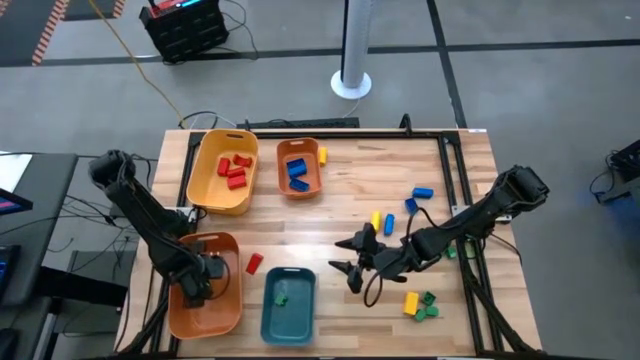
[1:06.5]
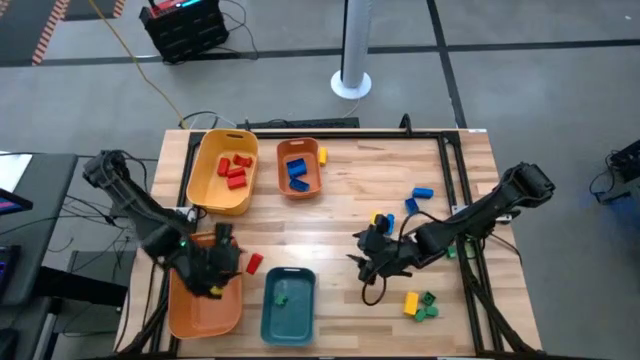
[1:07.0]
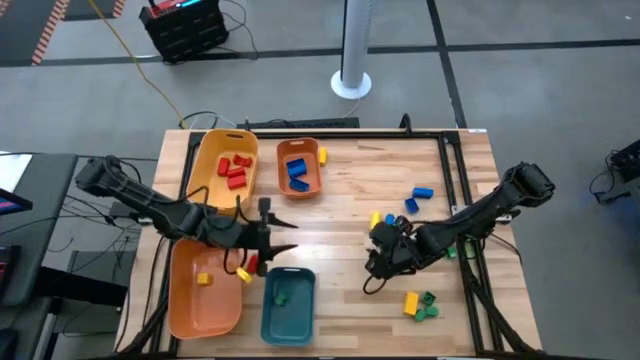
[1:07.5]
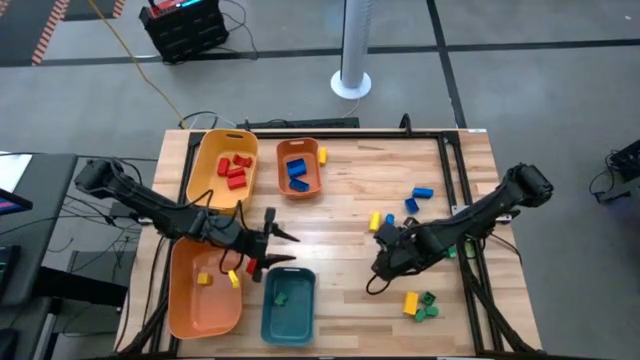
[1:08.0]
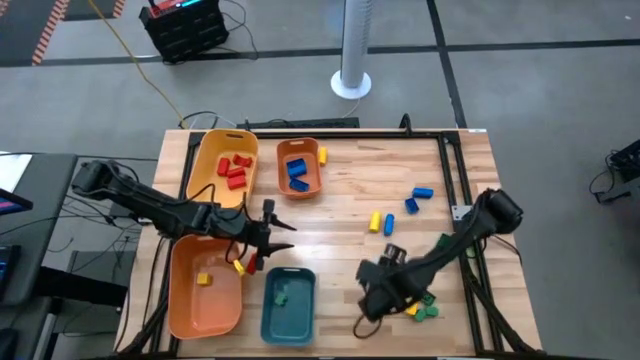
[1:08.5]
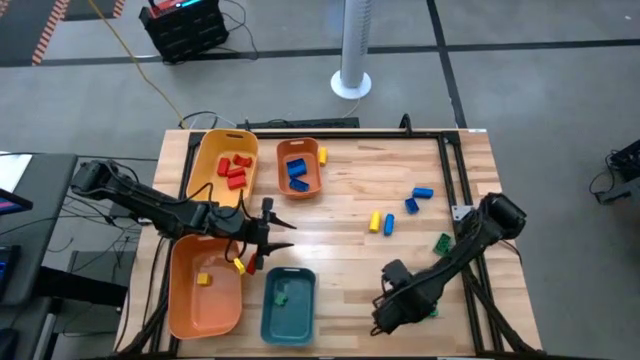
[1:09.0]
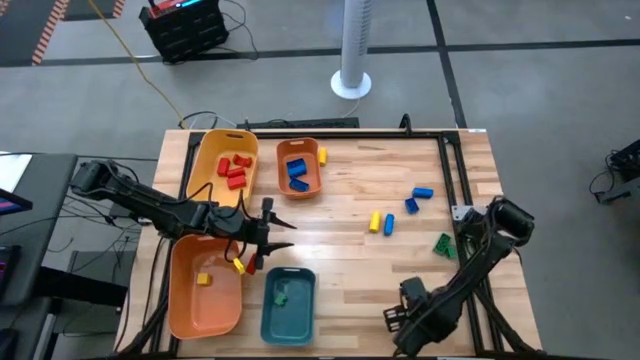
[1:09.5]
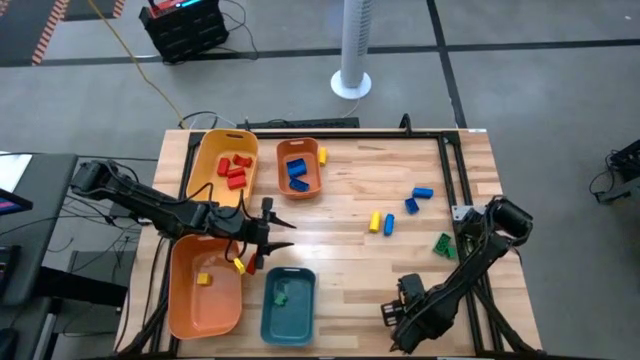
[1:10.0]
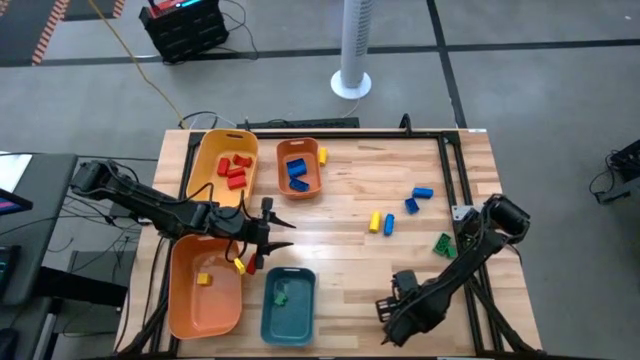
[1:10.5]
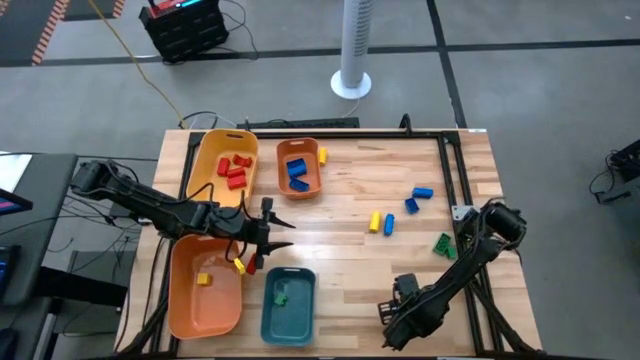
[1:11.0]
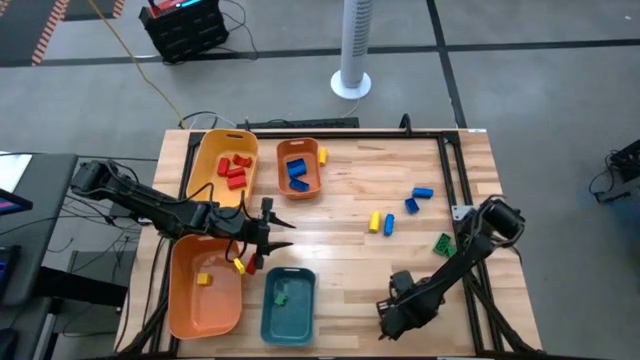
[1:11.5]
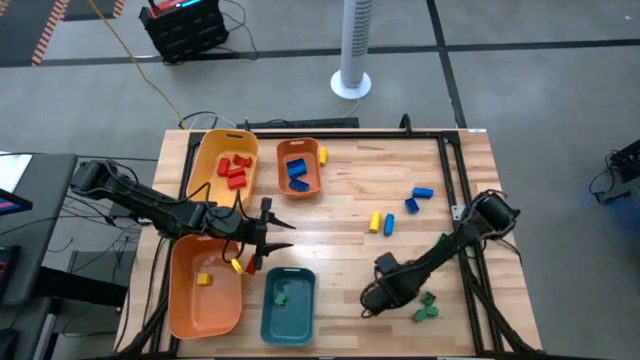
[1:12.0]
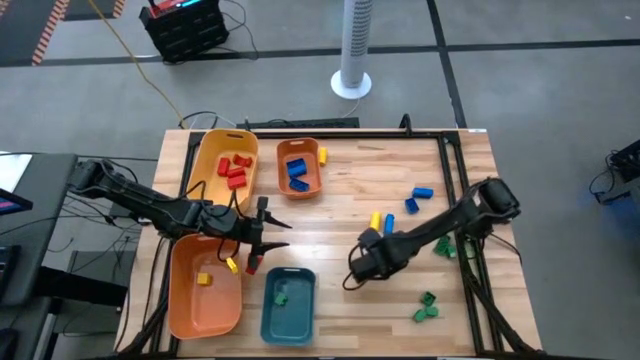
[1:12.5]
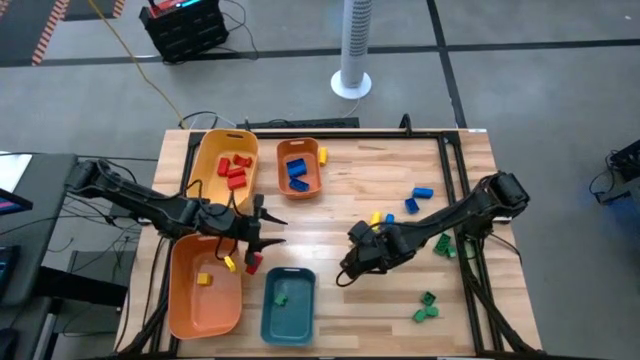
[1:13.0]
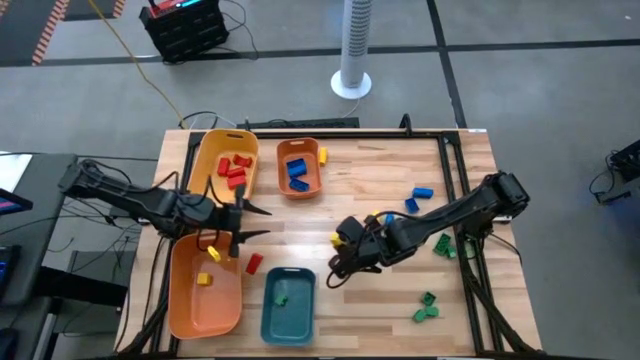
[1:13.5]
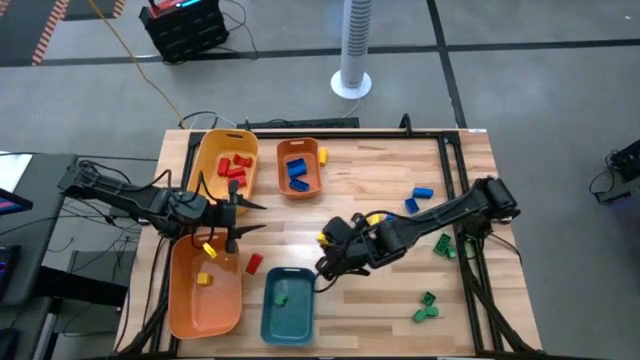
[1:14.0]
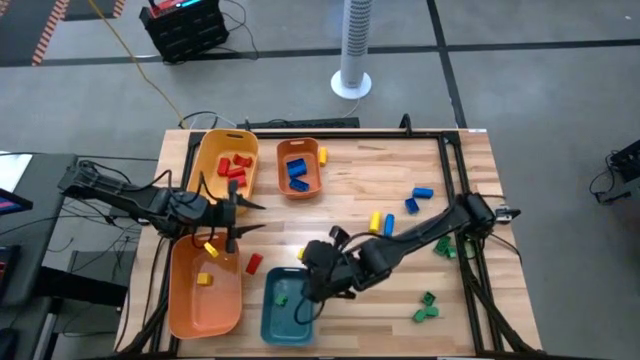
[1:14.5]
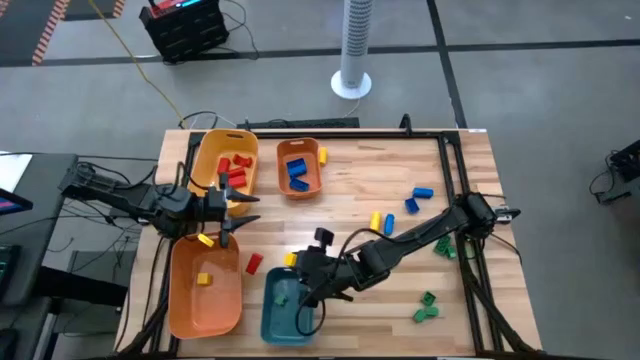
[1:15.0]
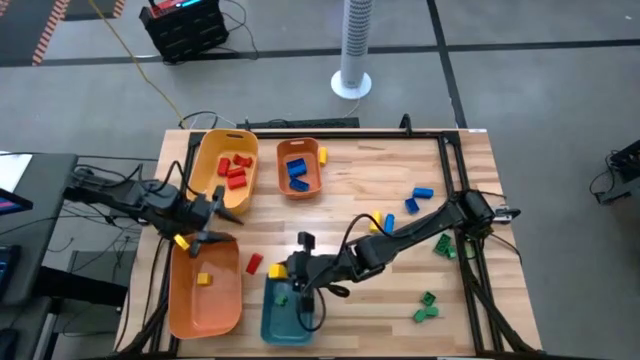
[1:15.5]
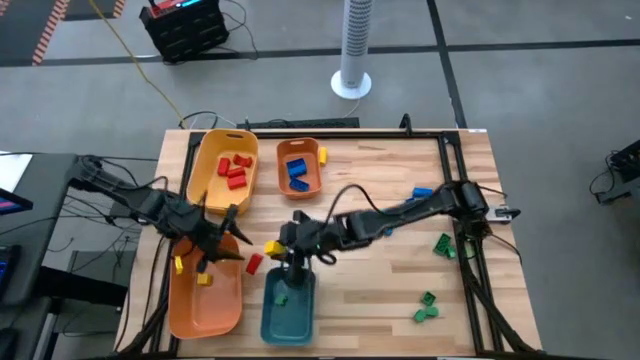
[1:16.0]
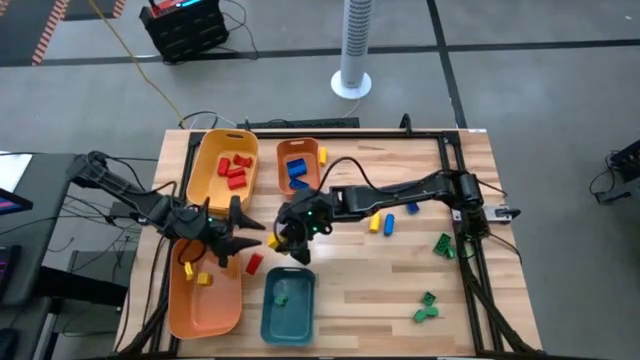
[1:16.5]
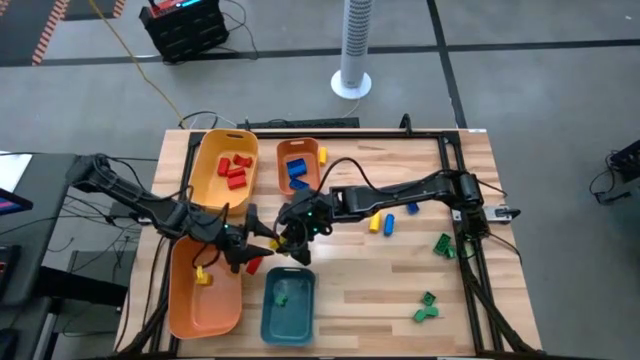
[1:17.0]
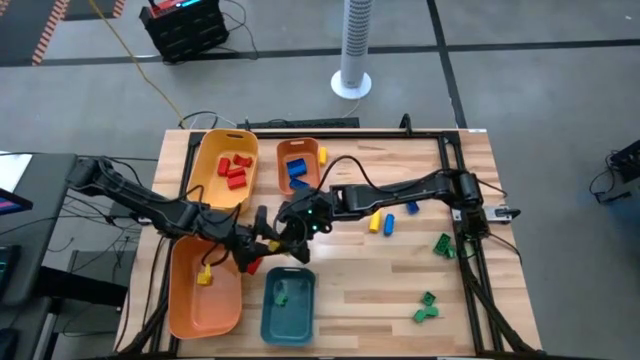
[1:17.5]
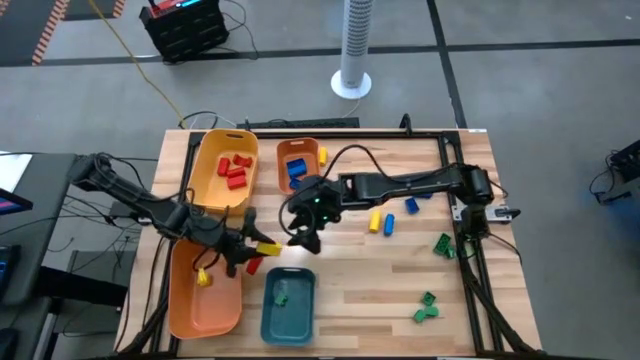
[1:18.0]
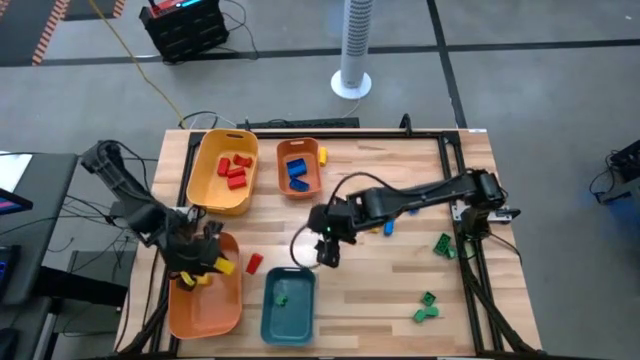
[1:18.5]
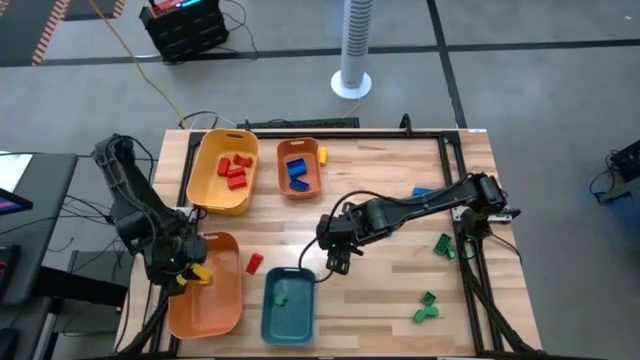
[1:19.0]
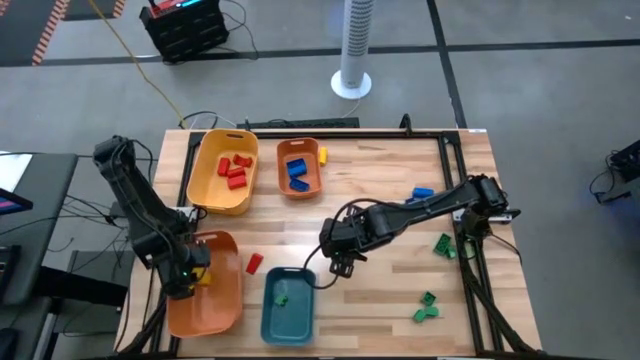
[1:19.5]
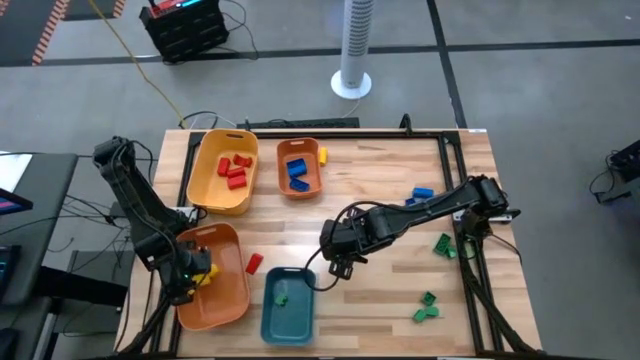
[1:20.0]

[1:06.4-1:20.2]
Task: Sort blocks
Put the yellow wooden block into the bottom orange bin

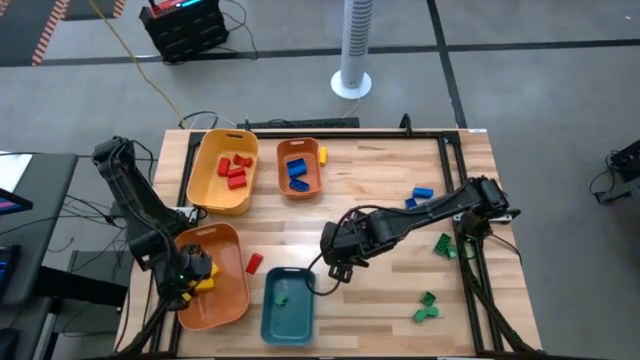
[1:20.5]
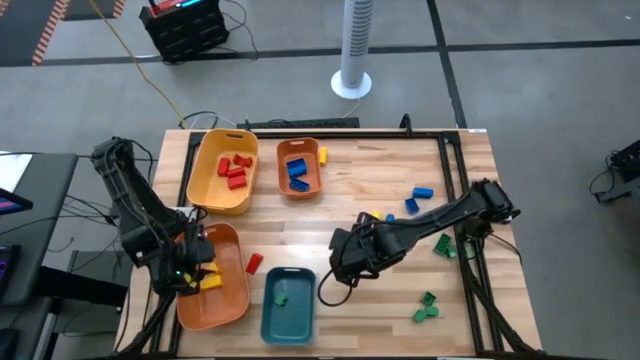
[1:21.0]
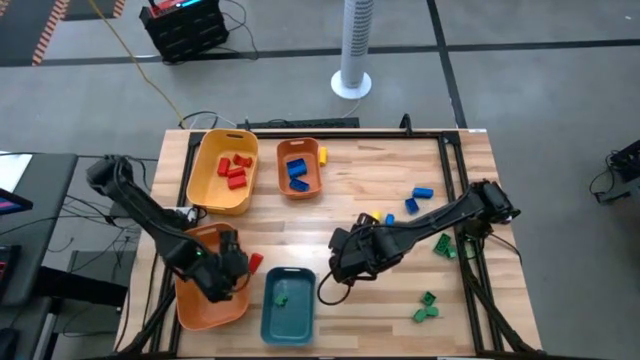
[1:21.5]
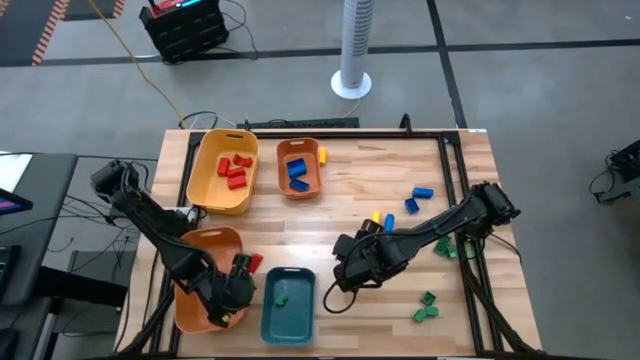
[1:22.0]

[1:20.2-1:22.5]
Adjust the orange bin

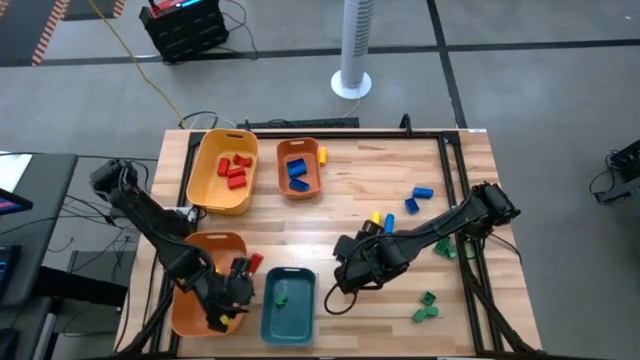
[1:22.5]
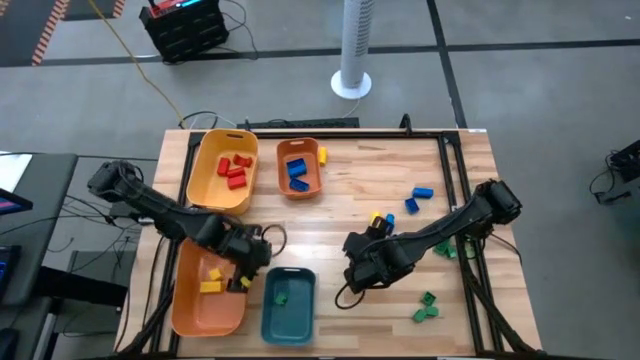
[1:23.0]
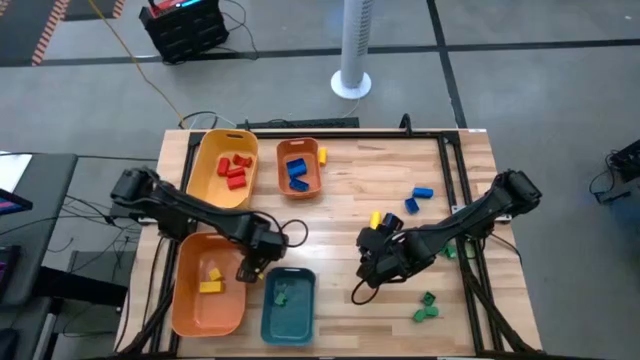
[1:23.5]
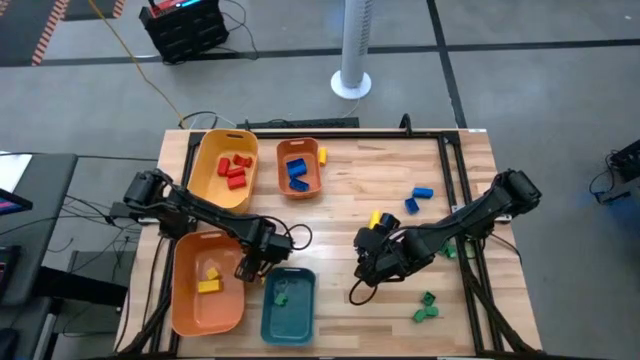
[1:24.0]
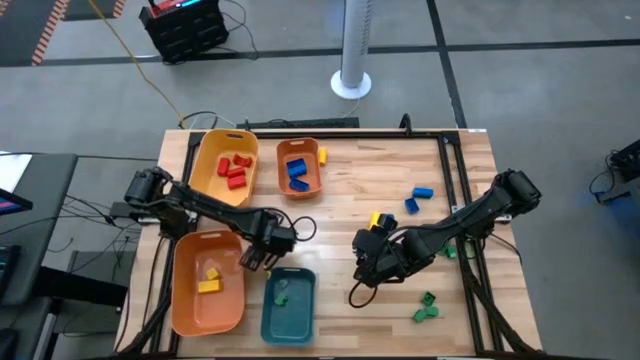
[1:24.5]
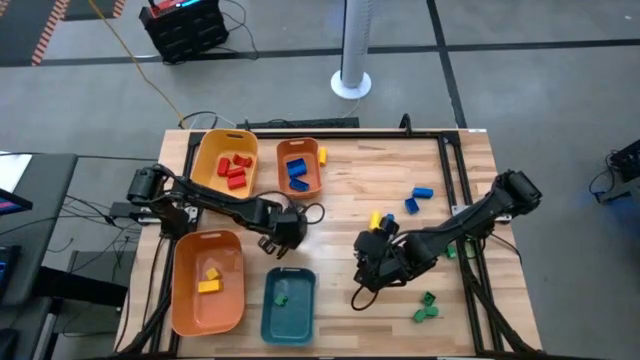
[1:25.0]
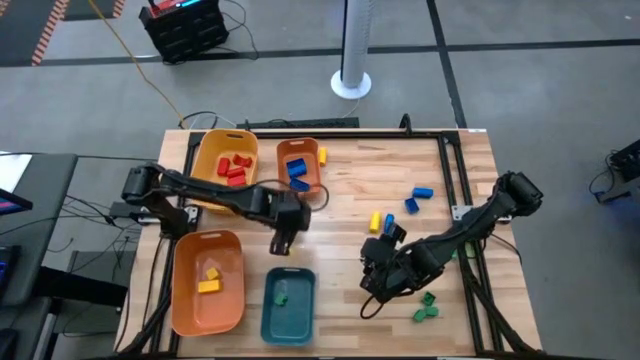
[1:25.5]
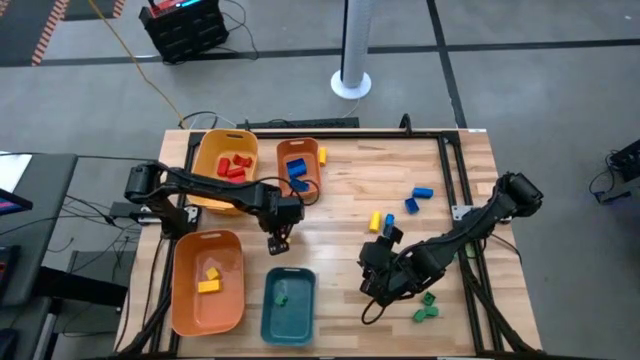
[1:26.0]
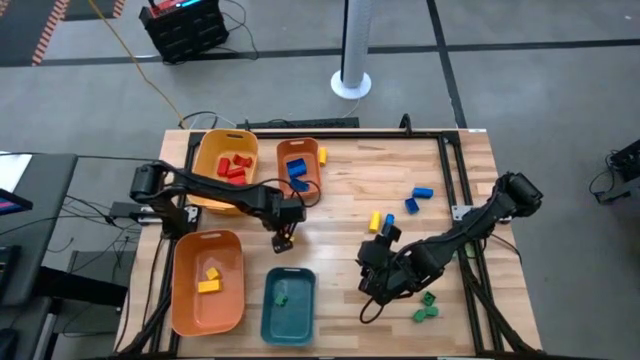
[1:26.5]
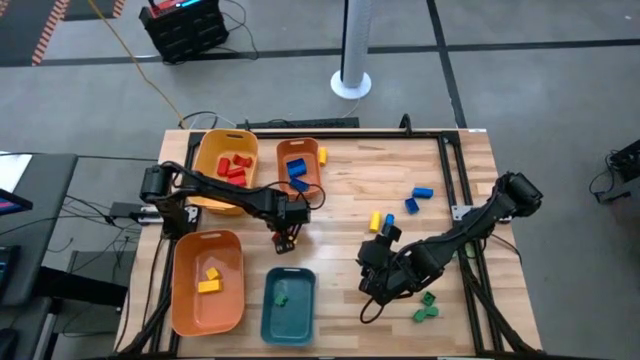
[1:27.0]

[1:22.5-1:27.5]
Put the red wooden block into the yellow bin

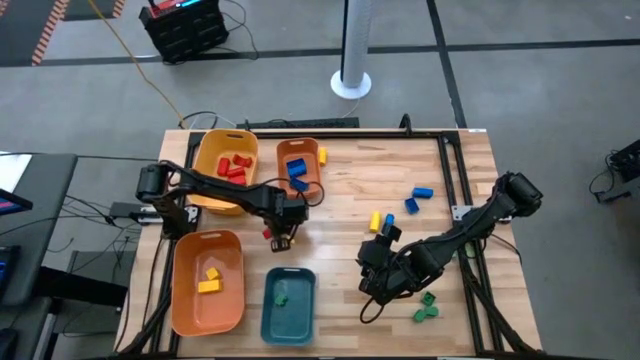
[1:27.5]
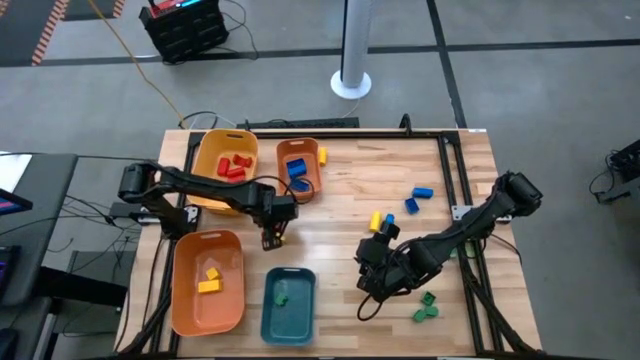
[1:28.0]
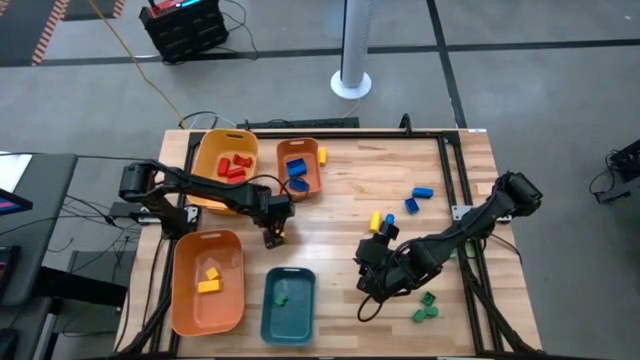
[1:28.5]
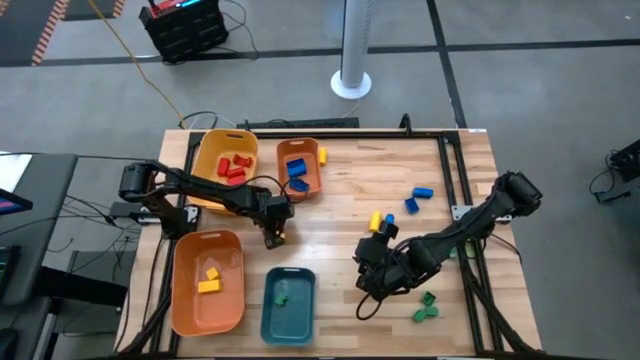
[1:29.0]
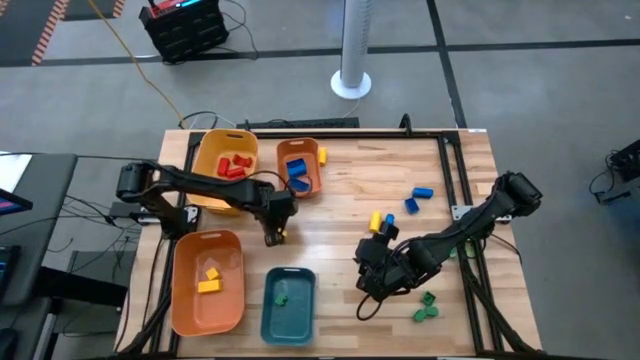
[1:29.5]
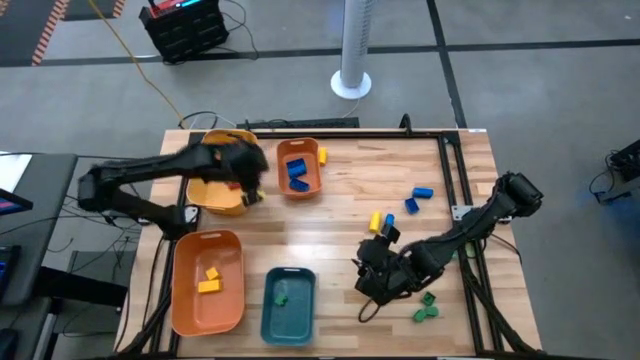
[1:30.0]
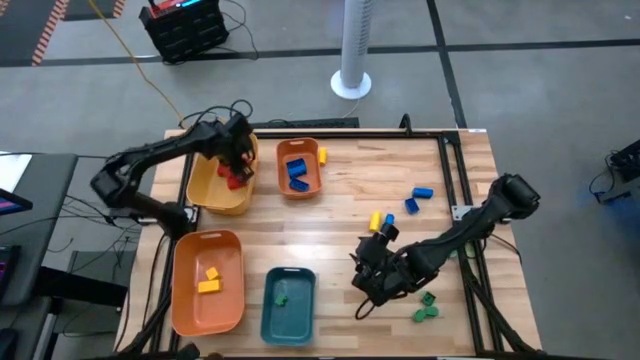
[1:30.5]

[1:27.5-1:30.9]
Put the red wooden block into the yellow bin
